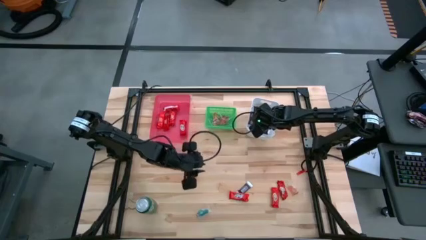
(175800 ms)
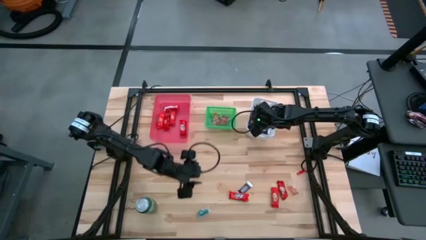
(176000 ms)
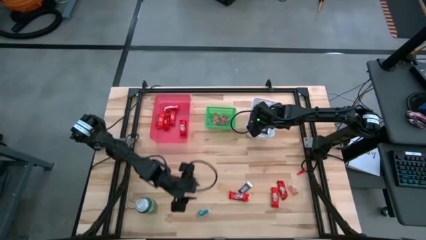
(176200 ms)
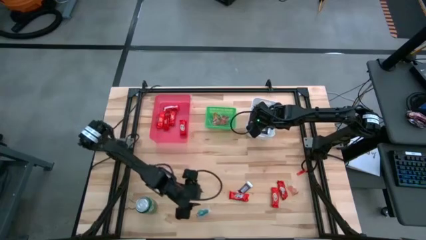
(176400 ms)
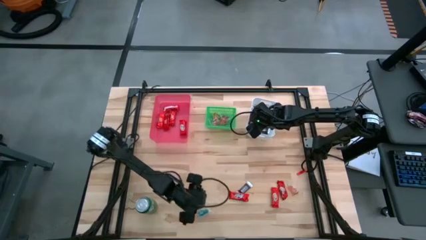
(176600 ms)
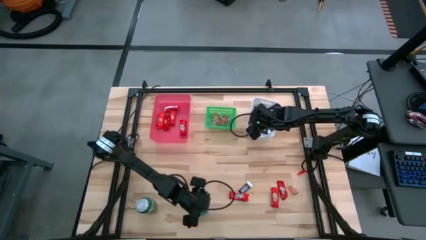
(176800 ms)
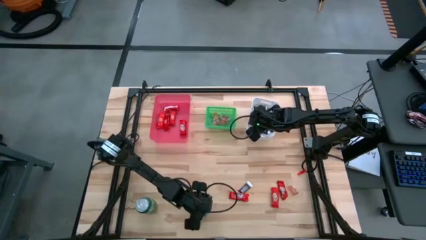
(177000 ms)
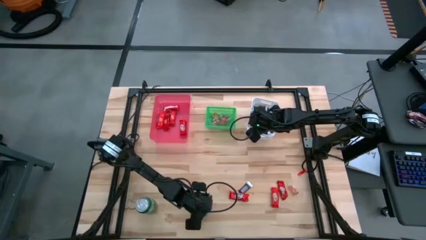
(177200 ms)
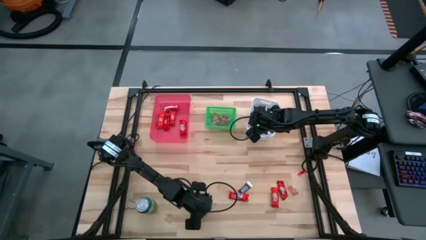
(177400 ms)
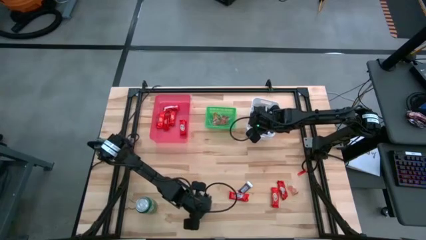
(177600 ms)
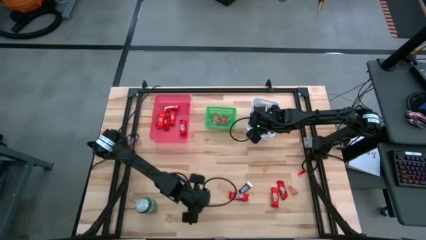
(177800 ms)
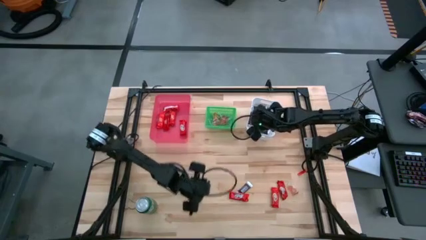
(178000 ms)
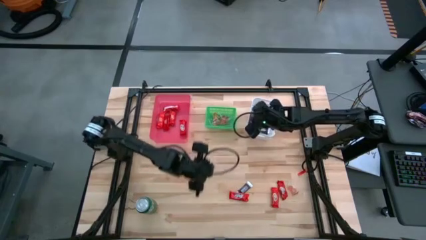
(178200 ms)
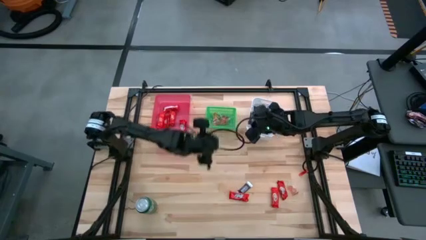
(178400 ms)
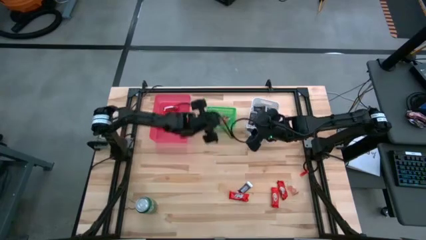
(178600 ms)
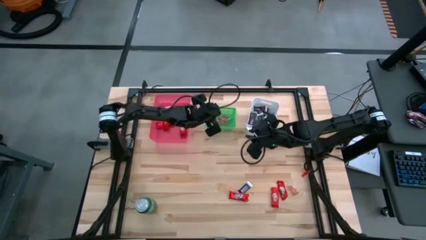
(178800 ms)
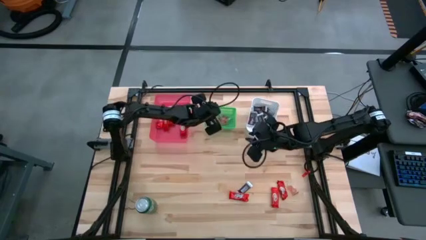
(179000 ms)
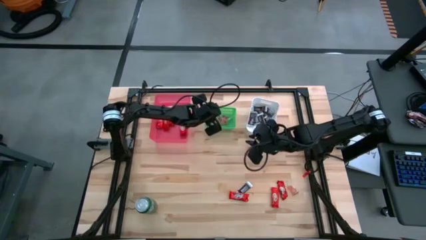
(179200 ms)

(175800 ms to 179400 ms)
Task: Sort candy
Put the blue gummy into the green bin

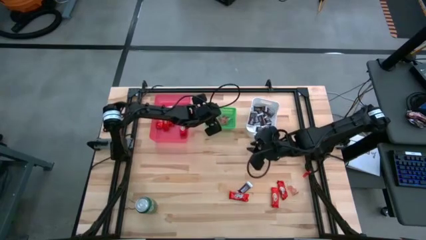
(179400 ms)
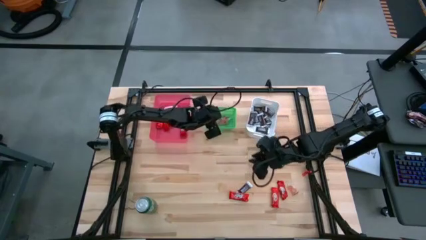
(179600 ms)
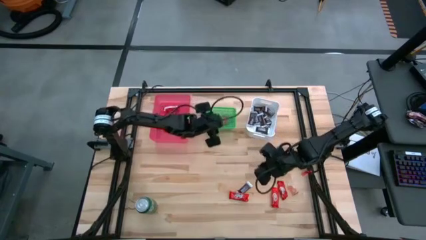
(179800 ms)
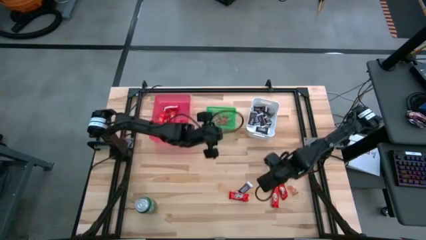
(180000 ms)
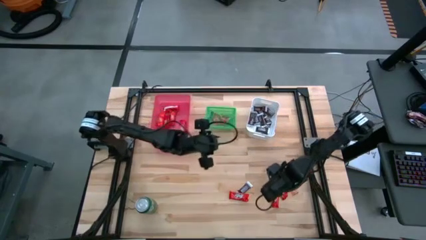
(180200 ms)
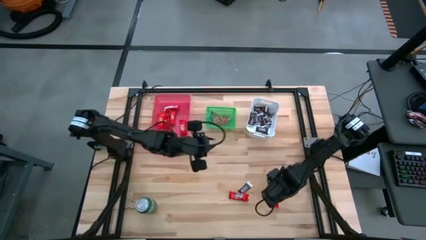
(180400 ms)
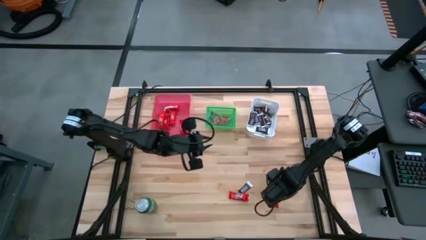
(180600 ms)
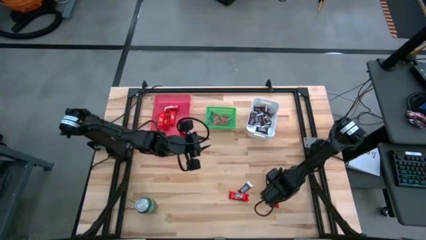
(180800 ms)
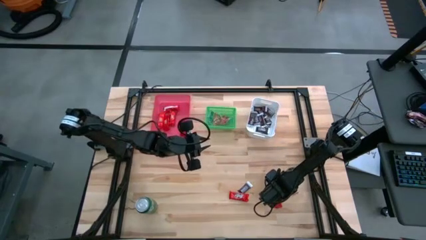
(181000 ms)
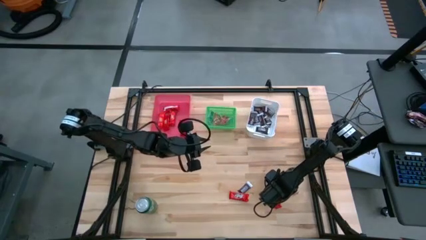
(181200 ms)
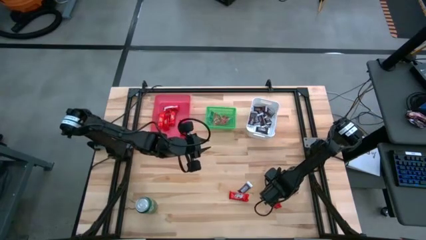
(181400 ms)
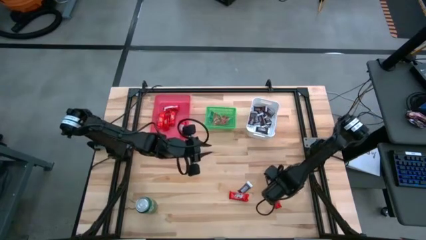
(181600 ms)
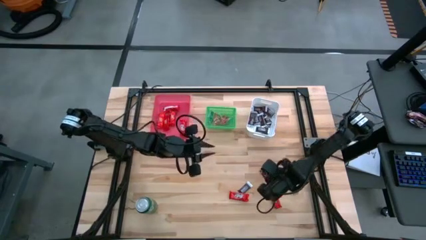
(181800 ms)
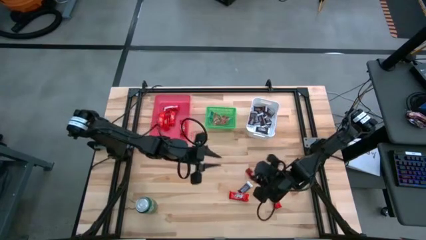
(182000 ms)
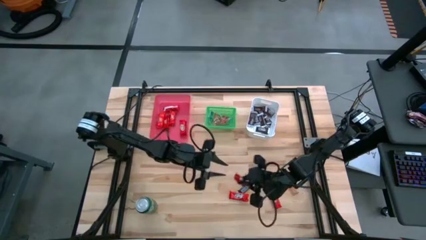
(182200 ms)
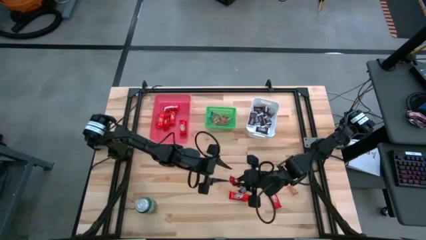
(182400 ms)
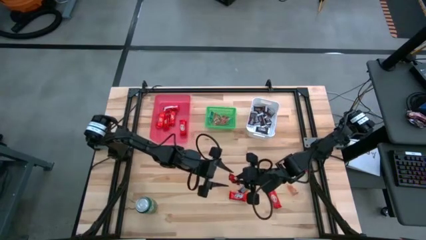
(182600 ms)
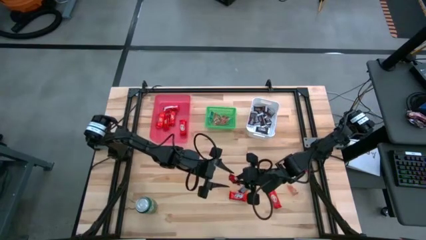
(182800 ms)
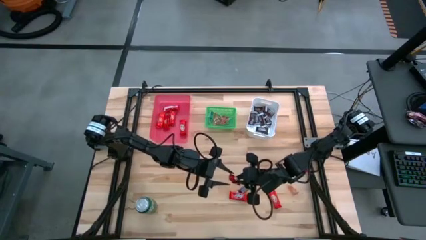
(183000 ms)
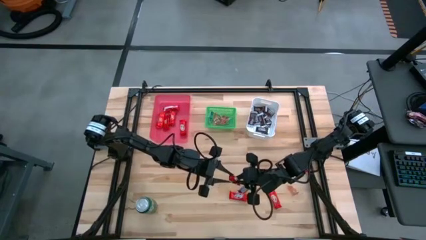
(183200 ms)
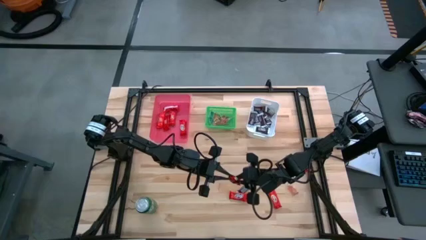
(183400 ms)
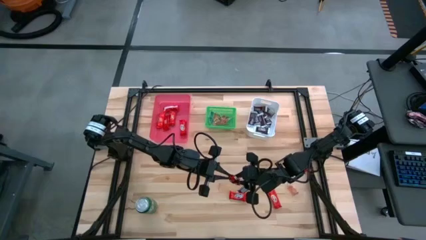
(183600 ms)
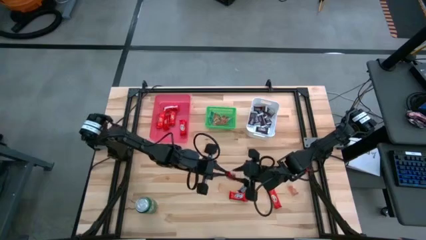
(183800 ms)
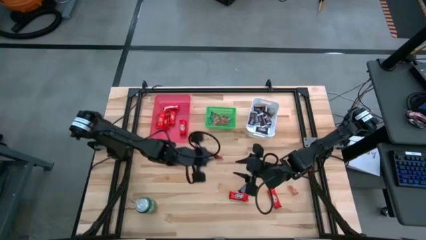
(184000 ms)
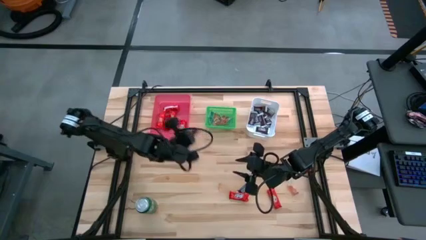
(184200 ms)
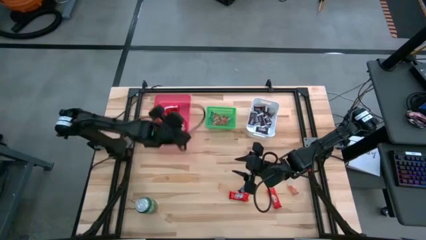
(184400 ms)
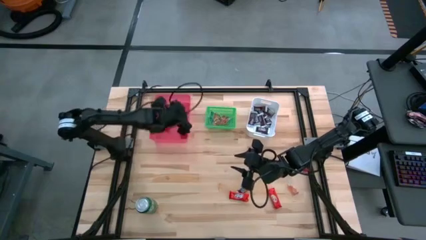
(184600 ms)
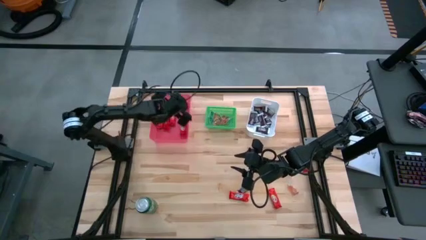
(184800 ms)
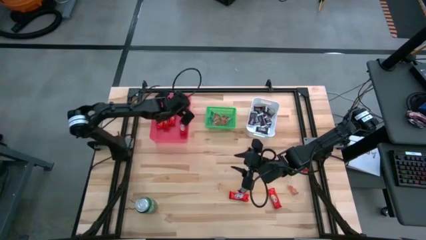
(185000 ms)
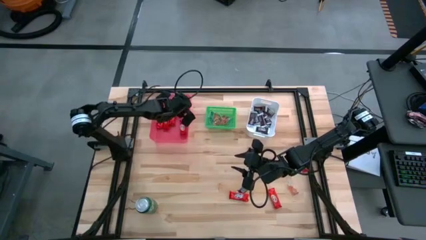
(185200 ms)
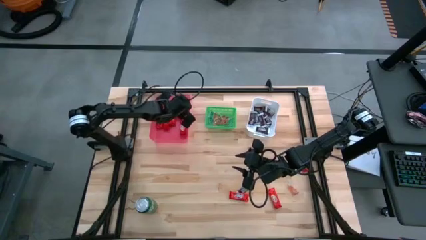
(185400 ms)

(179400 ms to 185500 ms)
Put the red chocolate bar into the pink bin

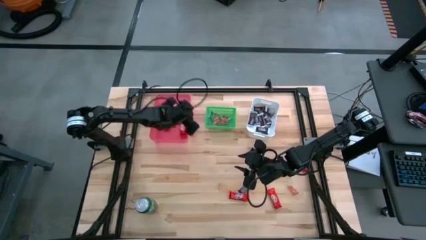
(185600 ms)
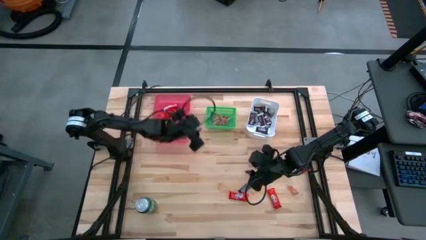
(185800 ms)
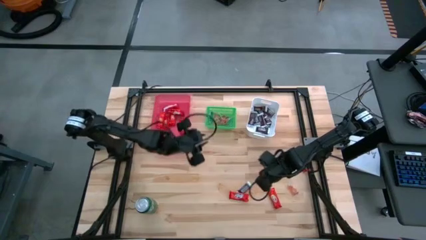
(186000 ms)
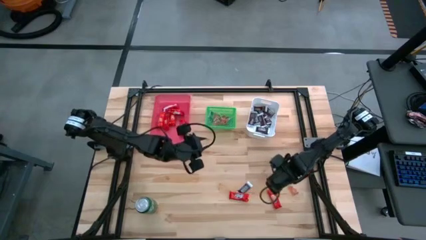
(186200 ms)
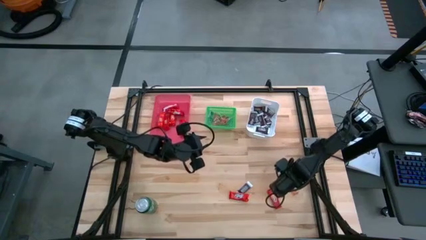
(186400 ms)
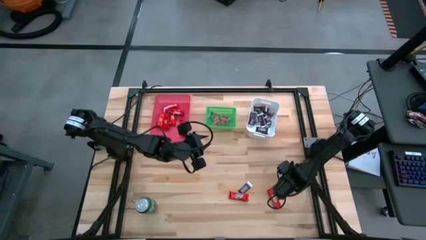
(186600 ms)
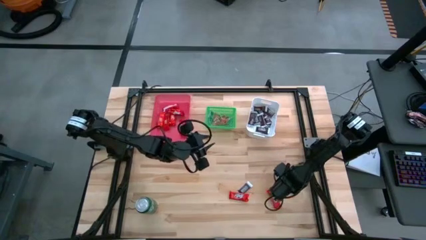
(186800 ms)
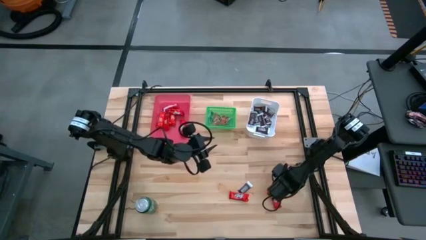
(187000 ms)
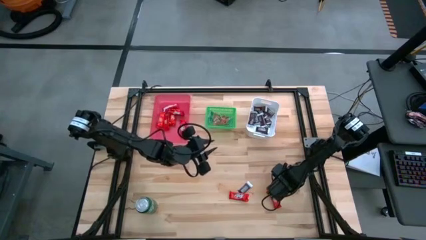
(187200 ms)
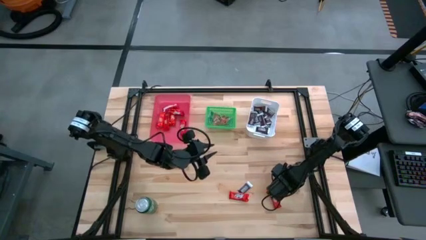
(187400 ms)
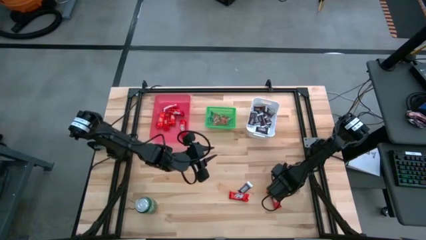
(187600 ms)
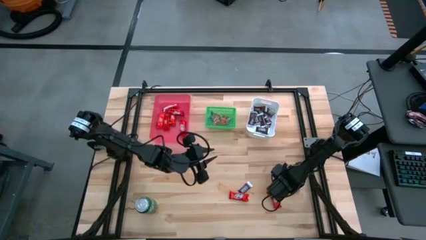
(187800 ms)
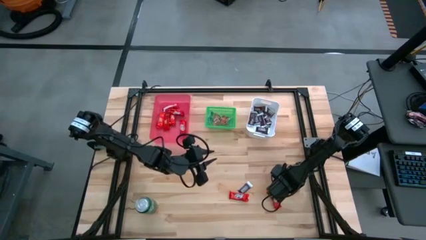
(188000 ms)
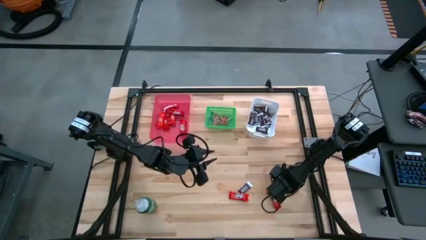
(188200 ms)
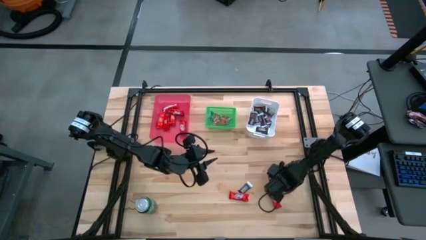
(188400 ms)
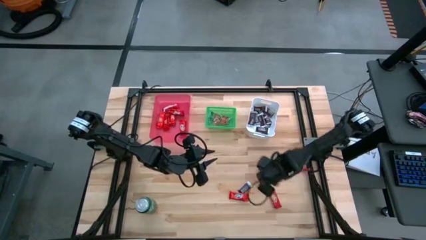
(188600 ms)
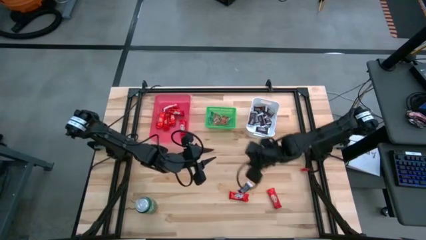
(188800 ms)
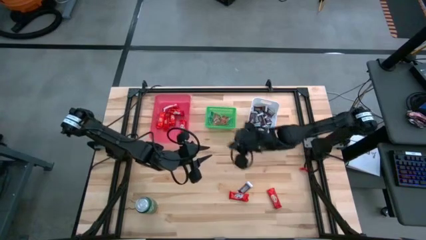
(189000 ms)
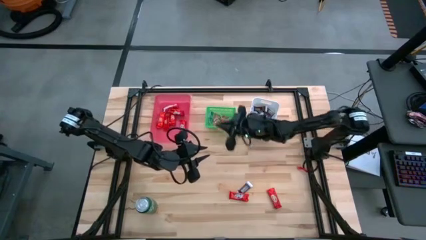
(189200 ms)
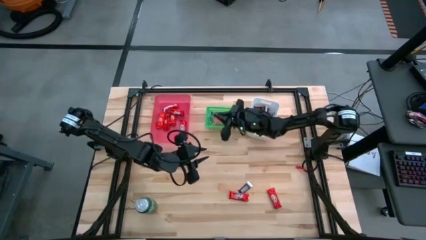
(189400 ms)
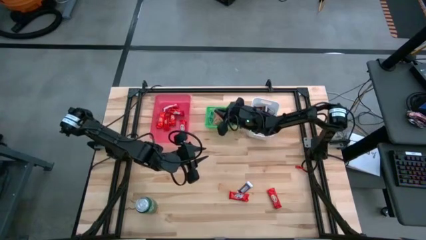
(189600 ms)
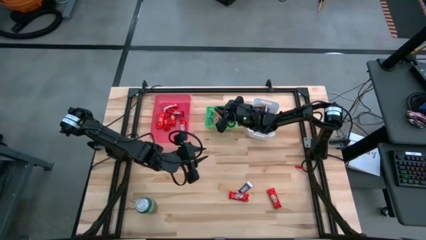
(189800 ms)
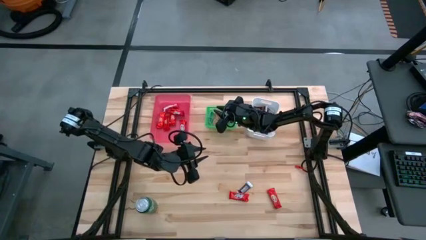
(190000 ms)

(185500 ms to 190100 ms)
Put the orange gummy into the green bin

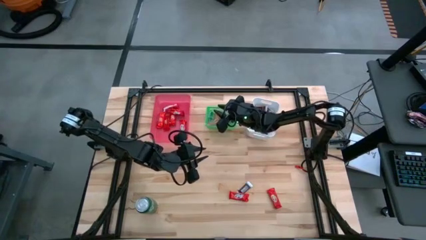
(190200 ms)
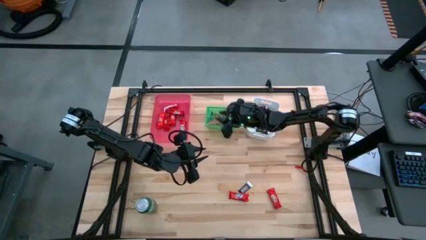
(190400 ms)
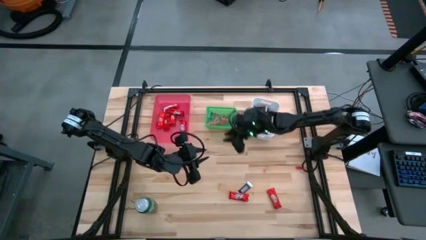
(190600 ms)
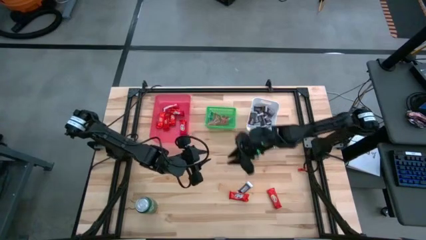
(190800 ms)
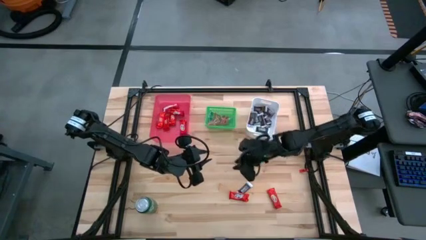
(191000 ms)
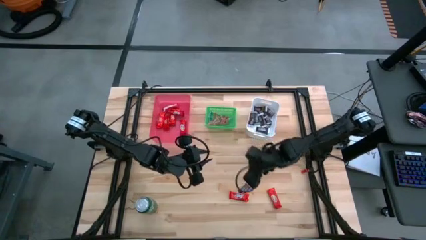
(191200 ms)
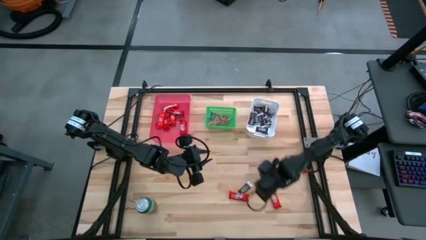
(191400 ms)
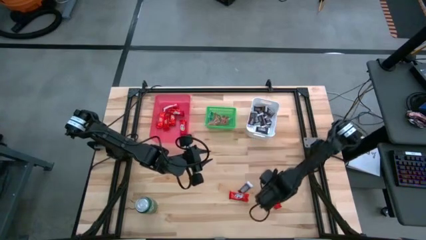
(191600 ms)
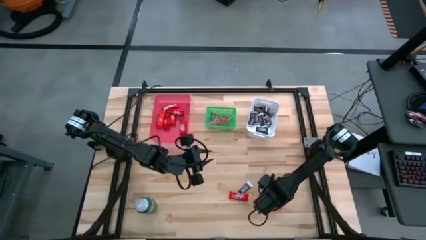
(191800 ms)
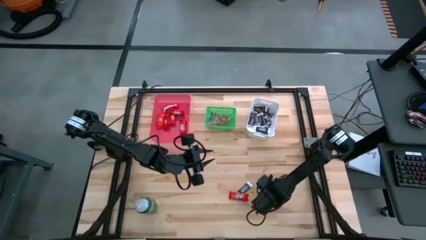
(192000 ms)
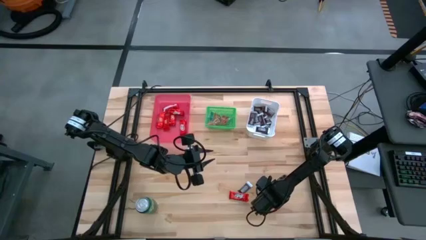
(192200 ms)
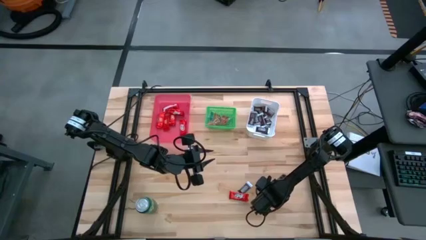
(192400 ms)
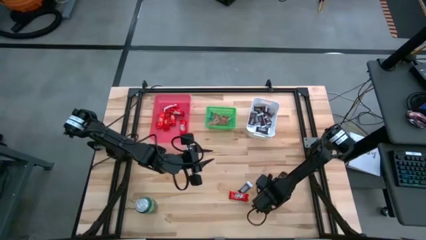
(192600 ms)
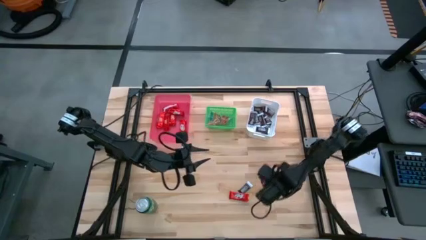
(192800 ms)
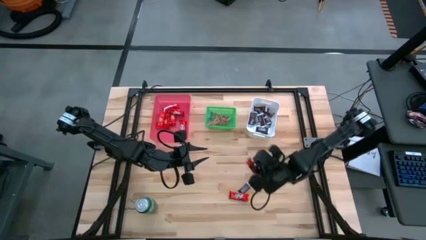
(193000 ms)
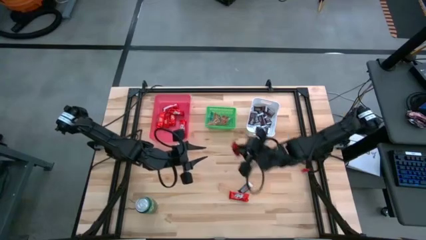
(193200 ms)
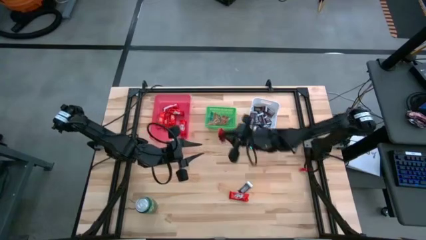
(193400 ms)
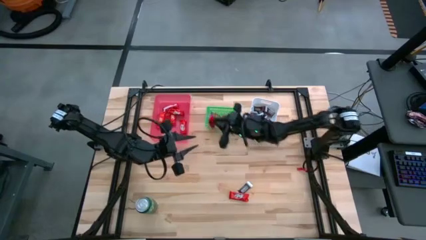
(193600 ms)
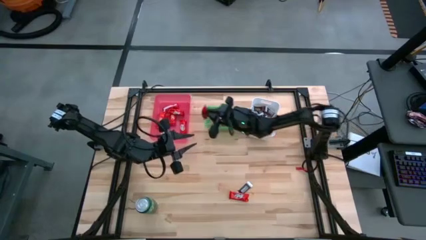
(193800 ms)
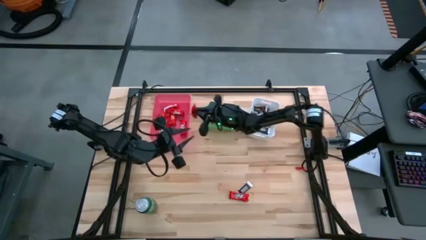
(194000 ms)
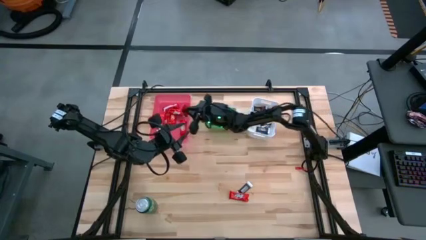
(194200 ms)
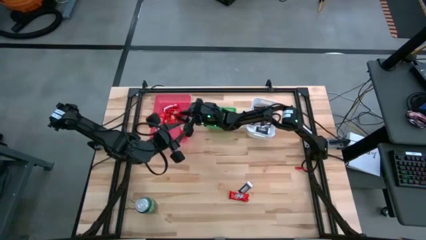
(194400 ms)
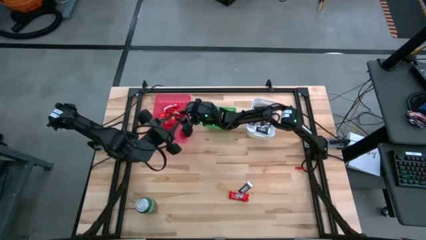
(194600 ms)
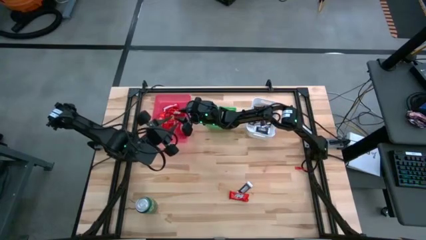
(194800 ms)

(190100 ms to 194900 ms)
Put the red chocolate bar into the pink bin
